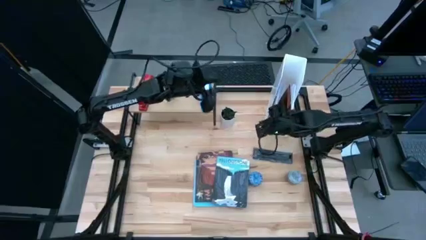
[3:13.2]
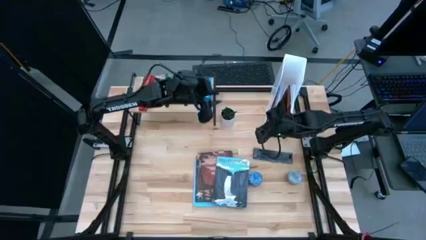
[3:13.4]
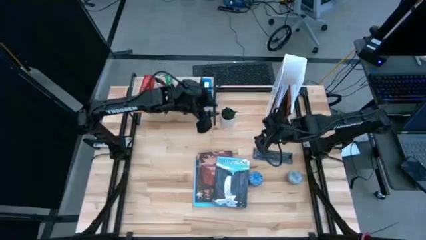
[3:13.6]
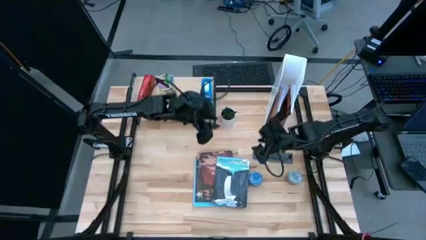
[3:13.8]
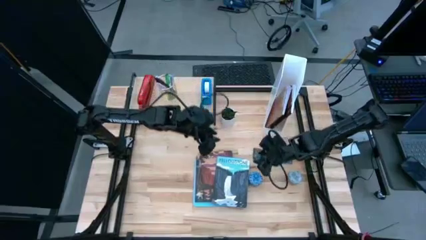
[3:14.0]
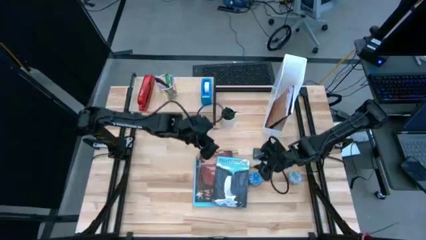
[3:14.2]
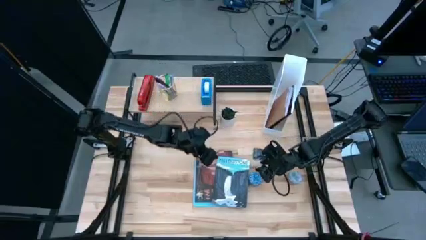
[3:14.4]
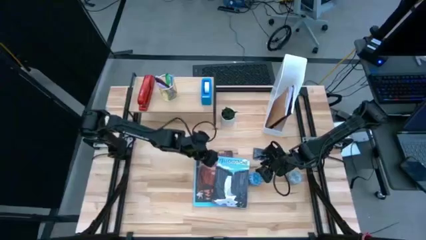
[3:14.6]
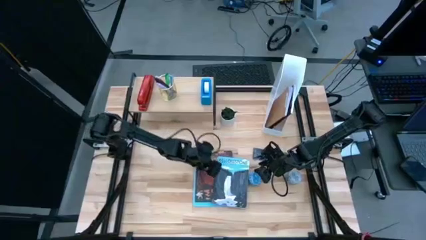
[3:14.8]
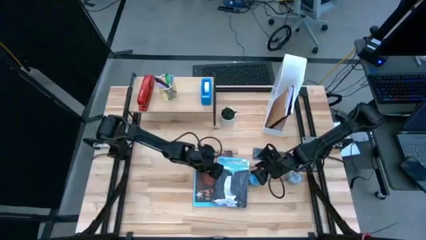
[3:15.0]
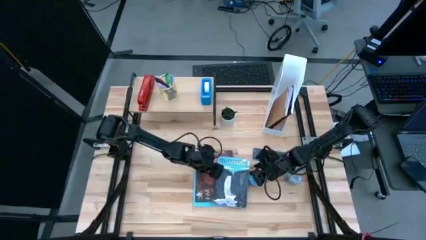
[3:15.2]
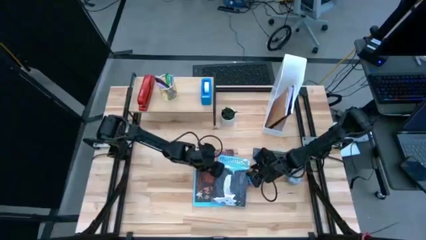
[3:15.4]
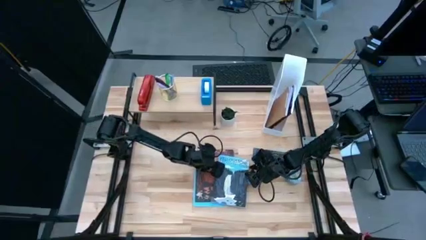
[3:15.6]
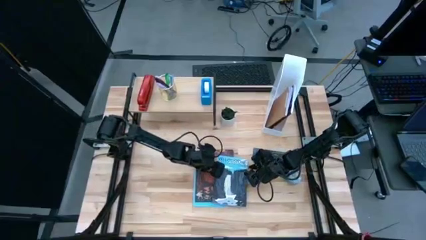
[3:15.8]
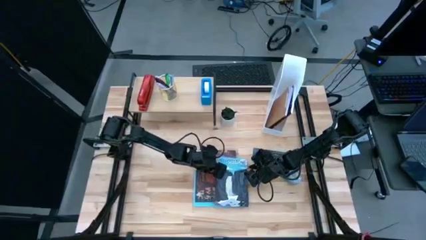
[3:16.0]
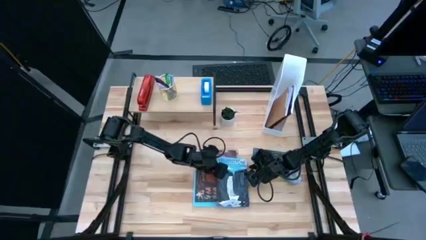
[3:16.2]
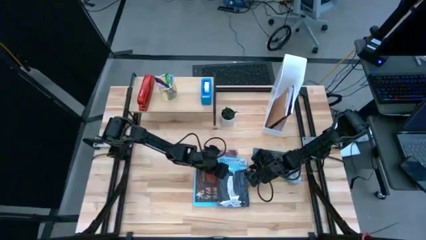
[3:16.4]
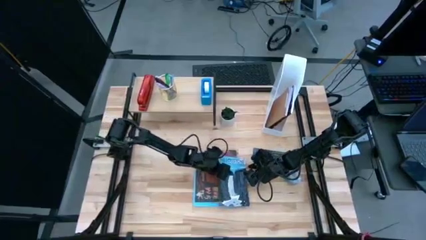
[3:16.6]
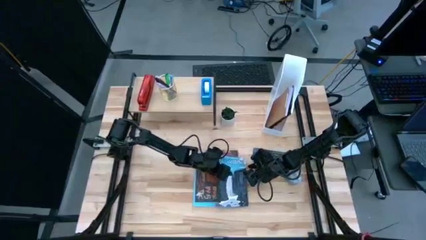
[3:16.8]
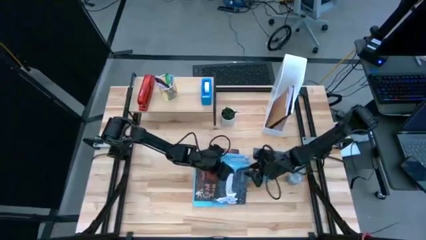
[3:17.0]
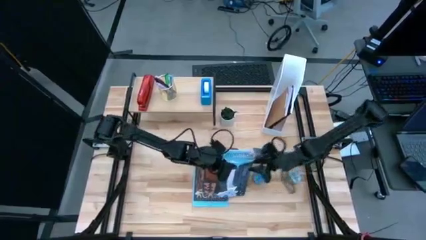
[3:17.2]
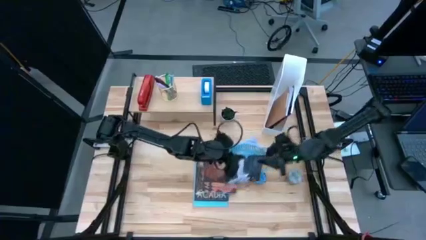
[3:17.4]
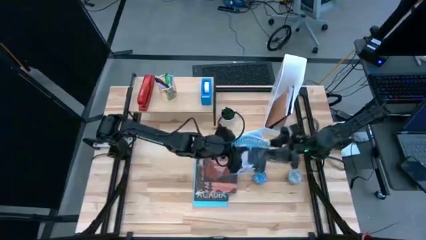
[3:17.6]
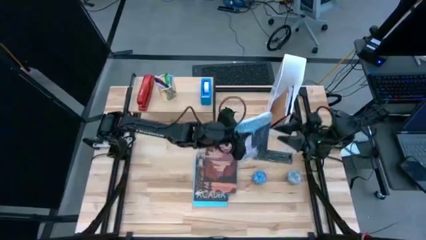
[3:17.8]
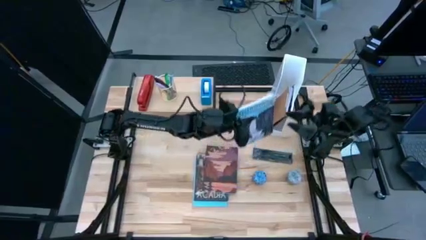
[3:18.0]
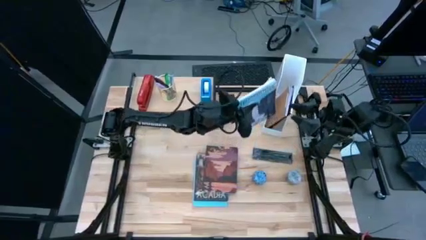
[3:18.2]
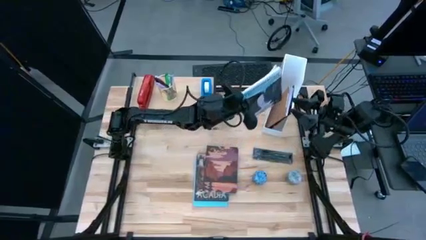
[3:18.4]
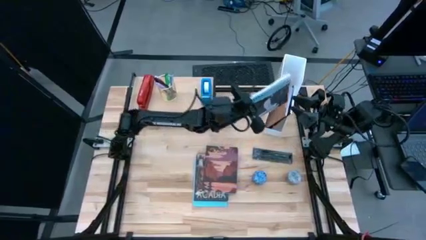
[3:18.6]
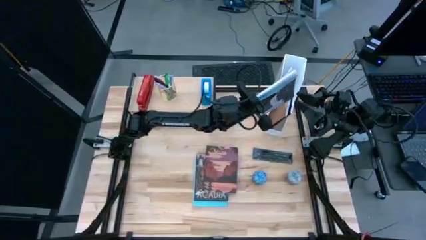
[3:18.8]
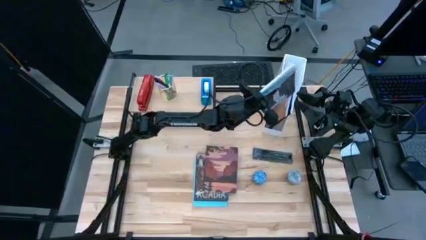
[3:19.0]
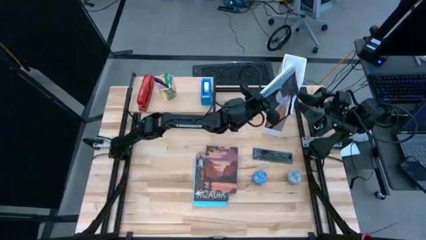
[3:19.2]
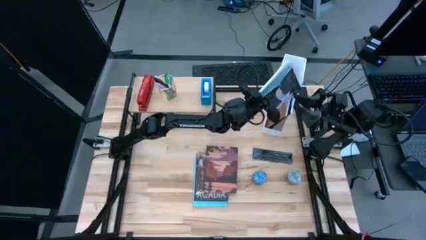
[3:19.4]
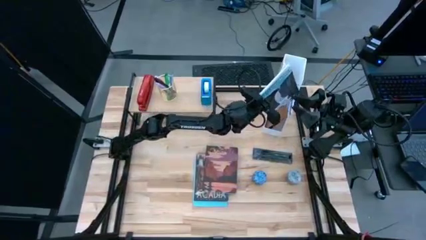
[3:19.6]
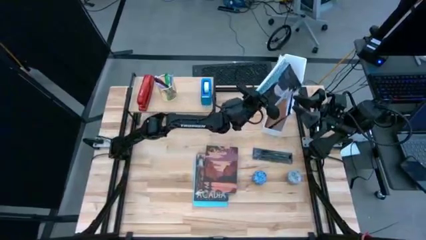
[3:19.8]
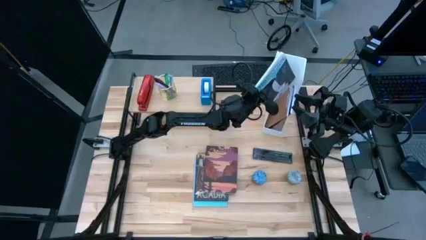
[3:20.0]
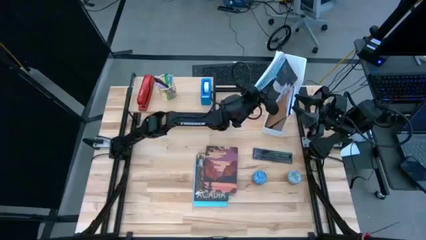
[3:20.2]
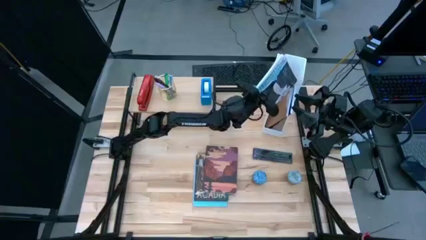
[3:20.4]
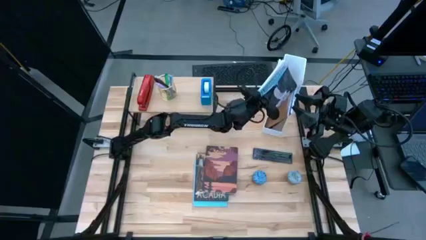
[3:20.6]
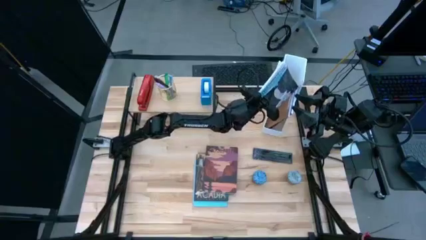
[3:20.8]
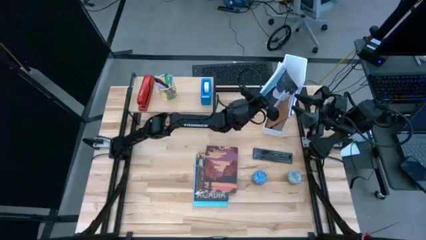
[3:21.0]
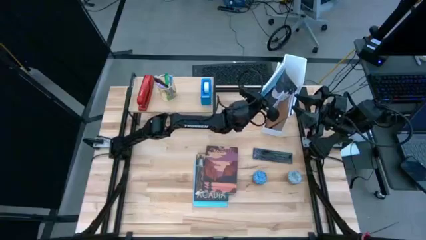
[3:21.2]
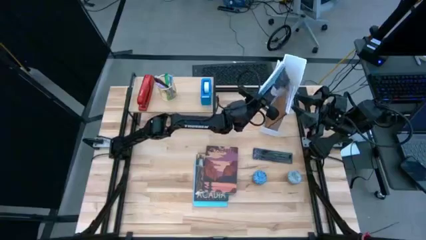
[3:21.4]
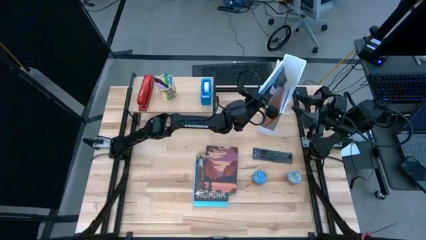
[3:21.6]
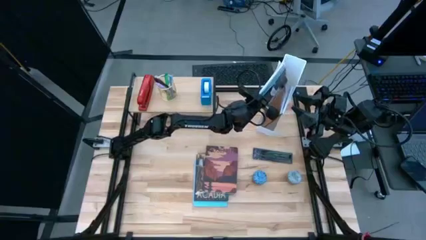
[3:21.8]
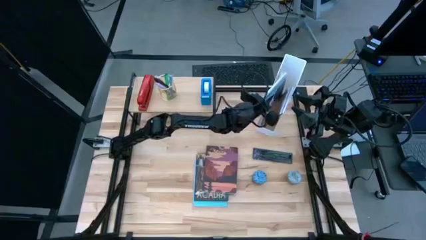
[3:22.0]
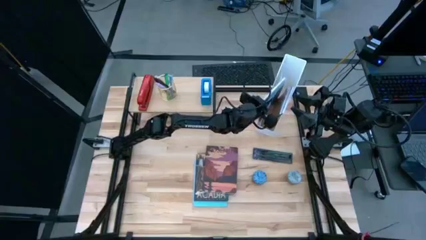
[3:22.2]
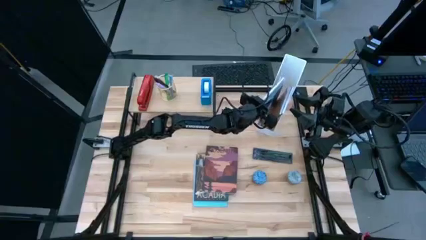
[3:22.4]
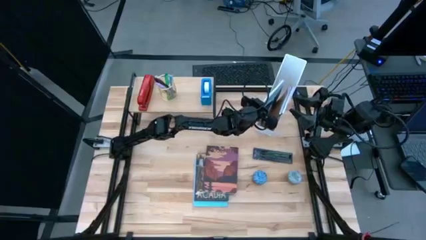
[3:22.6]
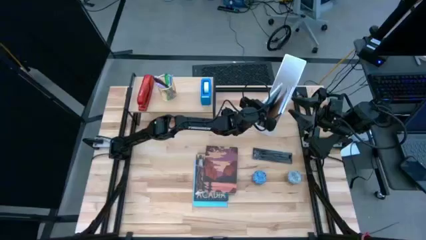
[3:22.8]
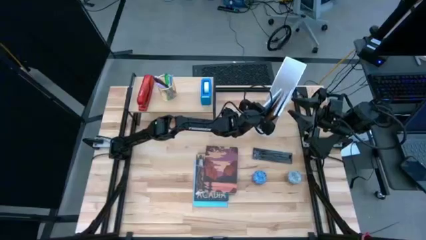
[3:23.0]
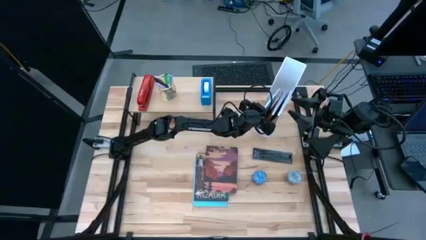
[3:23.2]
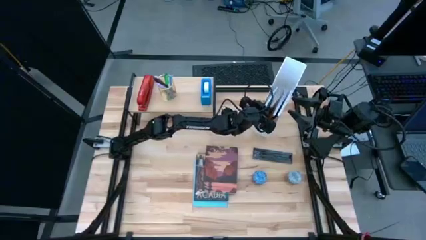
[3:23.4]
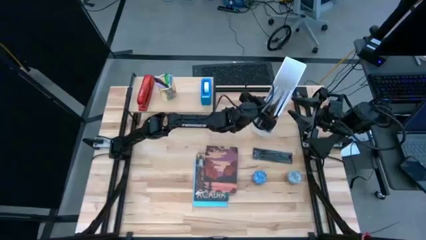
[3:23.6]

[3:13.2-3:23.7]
Task: Stock shelves
Put the blue book into the white book shelf

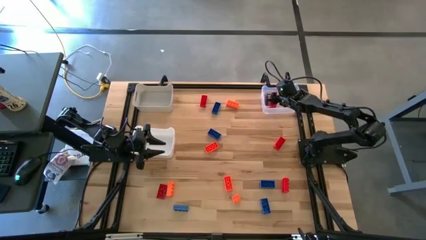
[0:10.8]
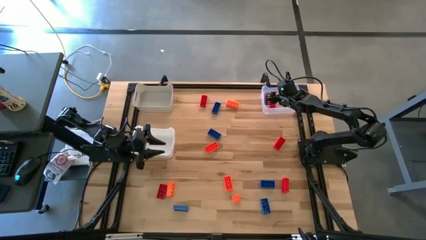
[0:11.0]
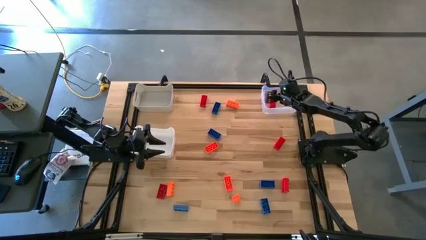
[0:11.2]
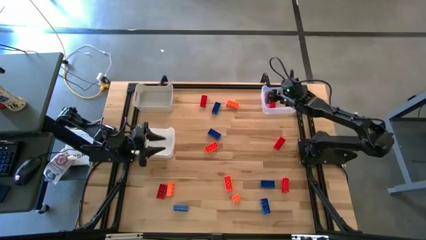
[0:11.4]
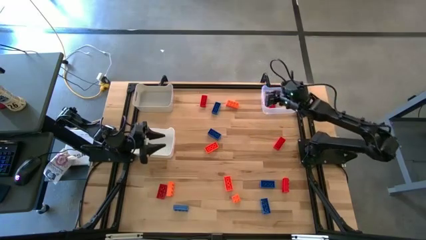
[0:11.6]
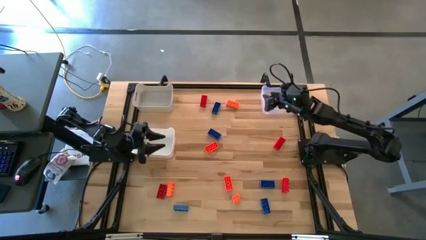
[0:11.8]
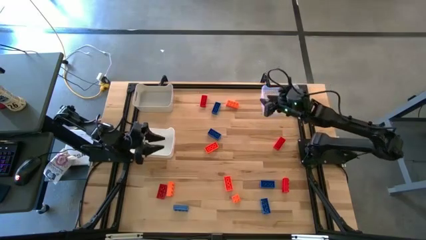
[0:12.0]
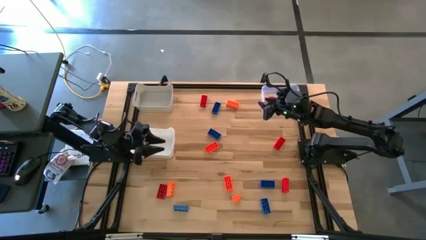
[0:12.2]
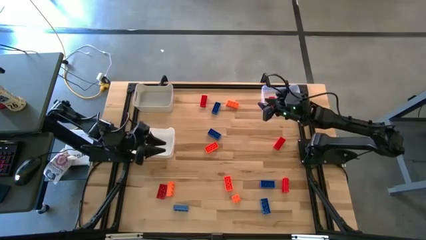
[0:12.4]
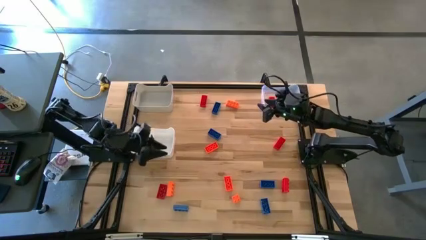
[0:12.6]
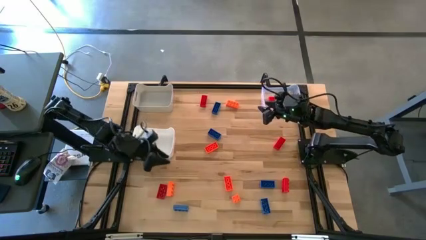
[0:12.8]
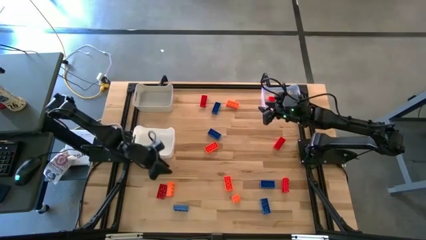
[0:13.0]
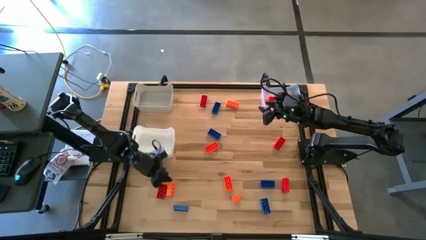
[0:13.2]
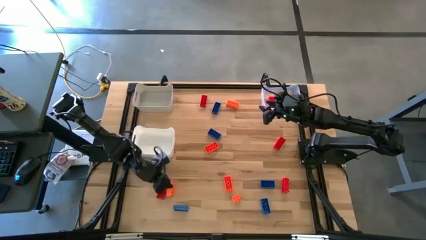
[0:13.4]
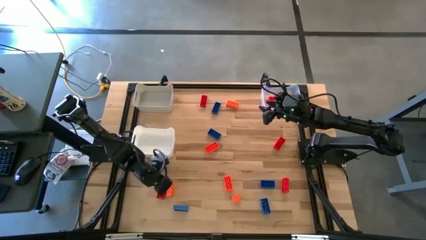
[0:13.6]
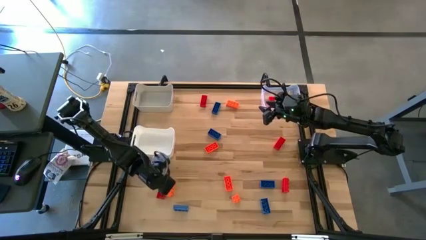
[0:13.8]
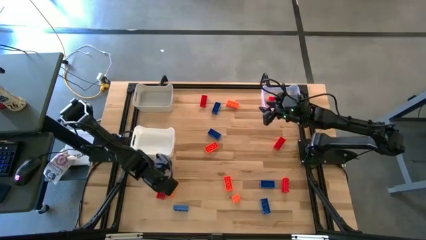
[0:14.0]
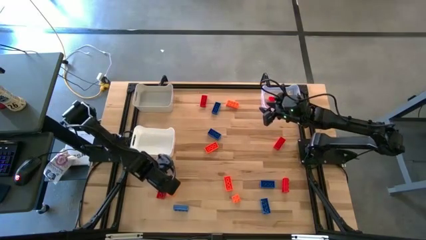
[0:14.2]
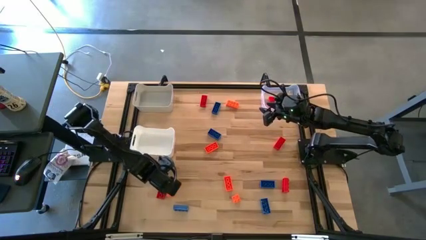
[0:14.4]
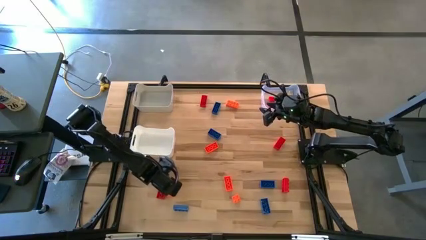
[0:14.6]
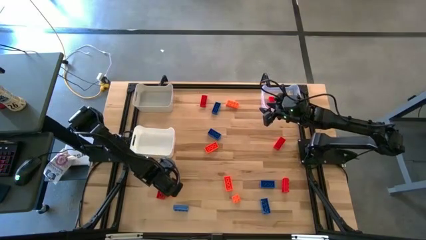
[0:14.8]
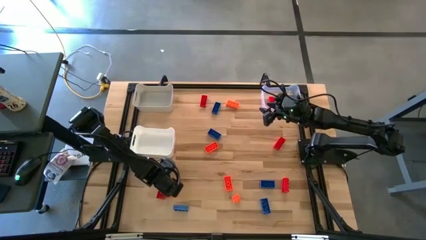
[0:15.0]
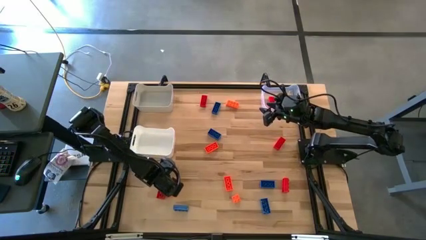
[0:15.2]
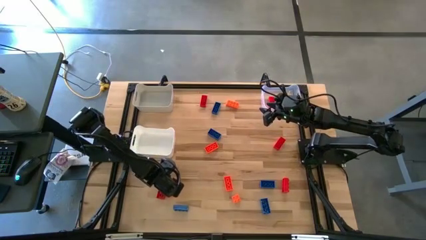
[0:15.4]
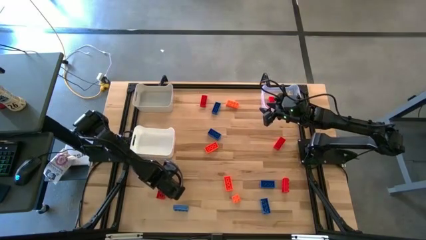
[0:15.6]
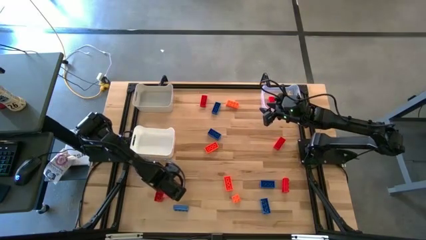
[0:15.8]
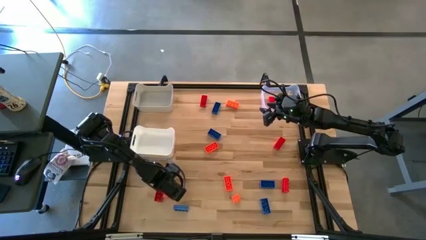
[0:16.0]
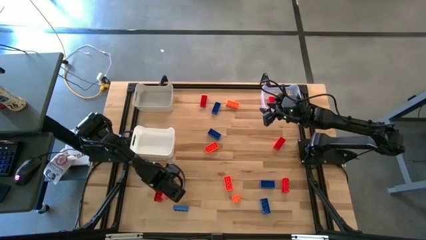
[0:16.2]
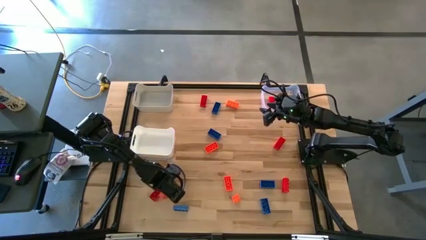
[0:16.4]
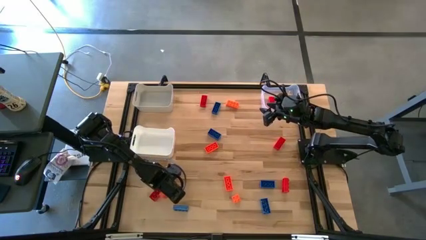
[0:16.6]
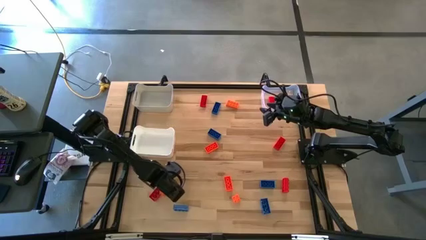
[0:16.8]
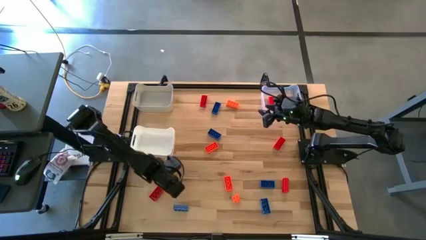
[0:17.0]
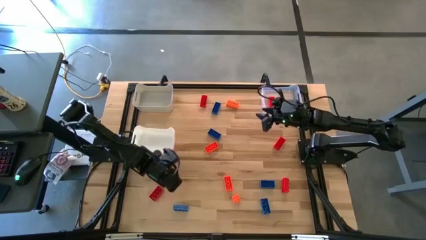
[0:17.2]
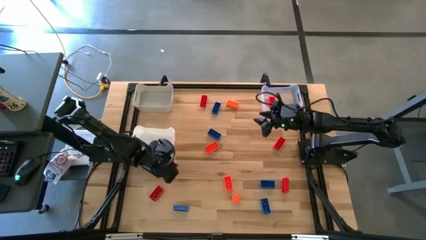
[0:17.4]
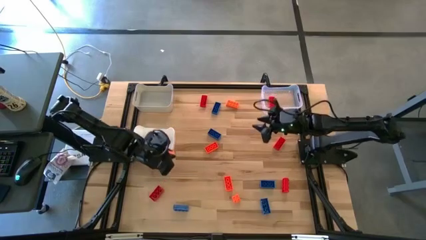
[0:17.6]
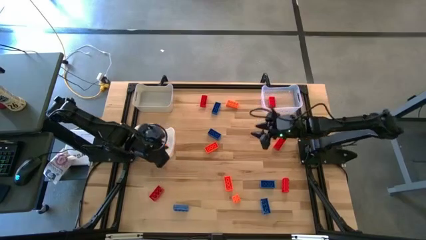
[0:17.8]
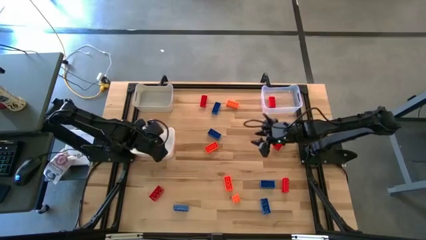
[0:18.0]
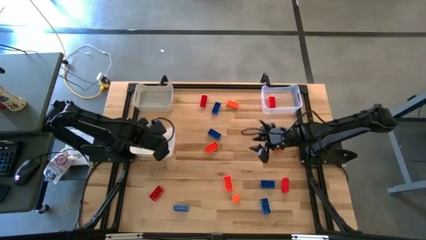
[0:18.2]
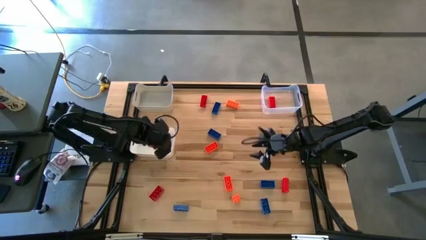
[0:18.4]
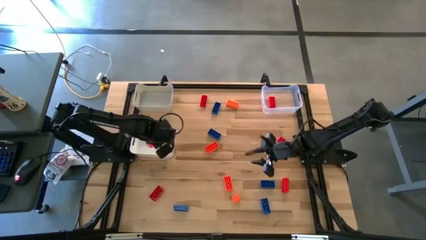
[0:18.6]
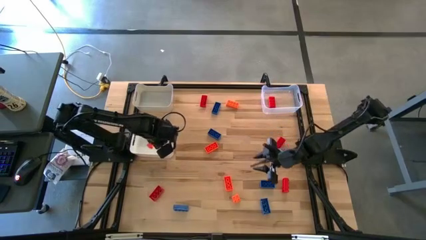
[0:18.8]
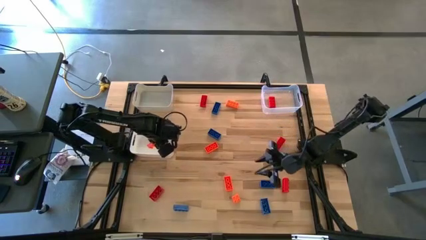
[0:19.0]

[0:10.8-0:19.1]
Task: Sort & place blocks by color
Put the orange game piece into the white bin
